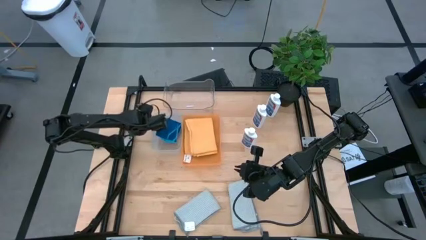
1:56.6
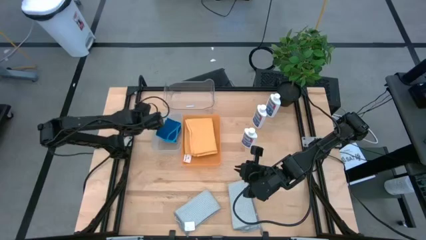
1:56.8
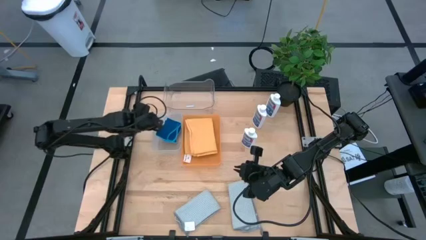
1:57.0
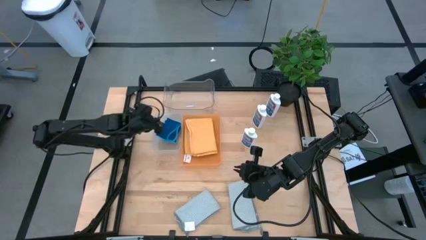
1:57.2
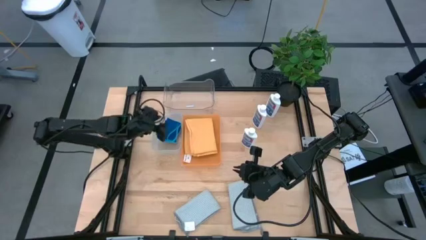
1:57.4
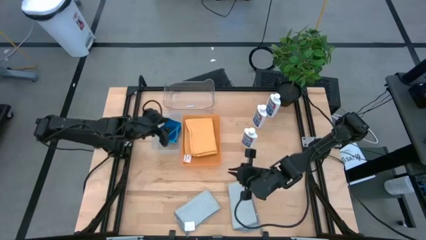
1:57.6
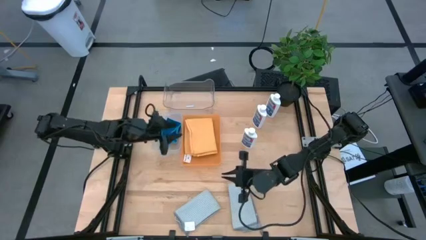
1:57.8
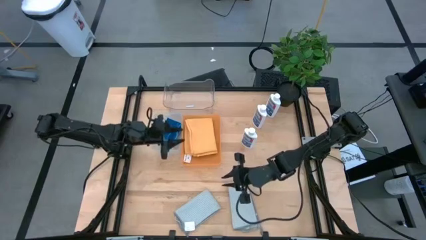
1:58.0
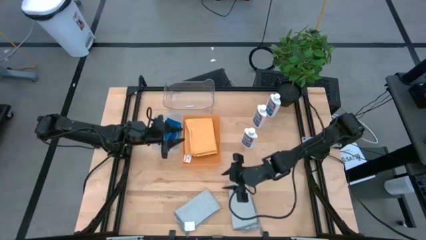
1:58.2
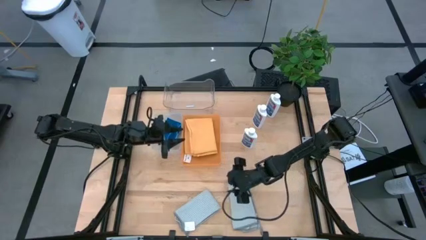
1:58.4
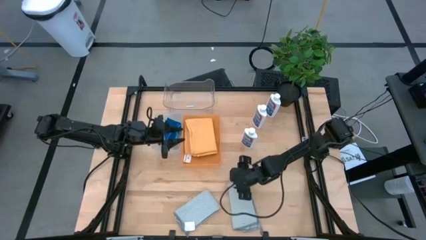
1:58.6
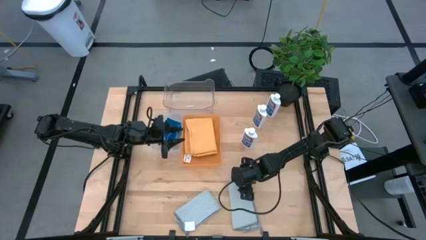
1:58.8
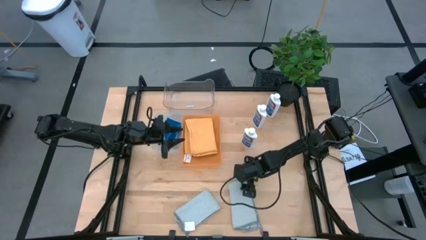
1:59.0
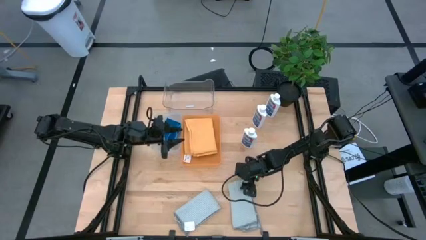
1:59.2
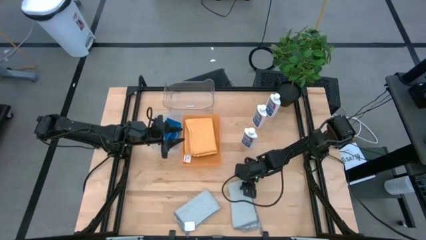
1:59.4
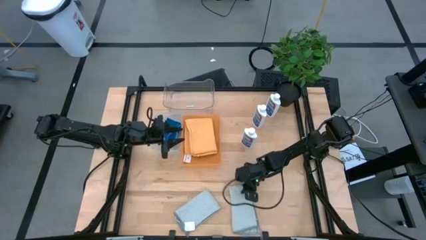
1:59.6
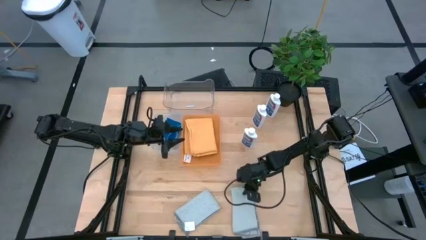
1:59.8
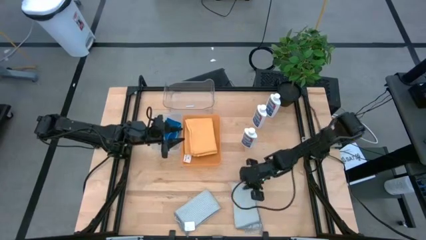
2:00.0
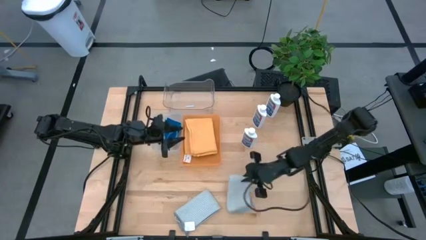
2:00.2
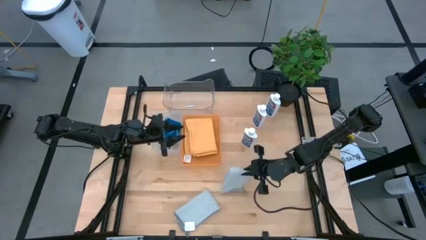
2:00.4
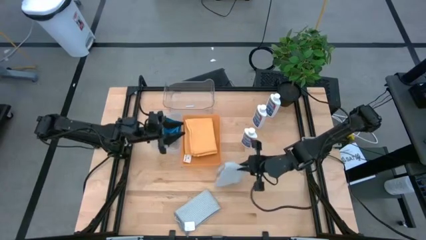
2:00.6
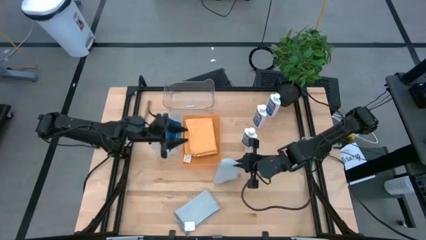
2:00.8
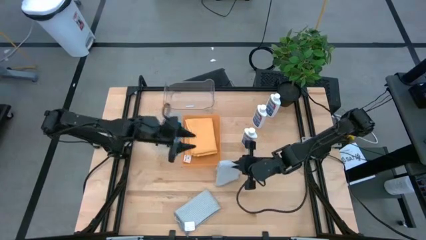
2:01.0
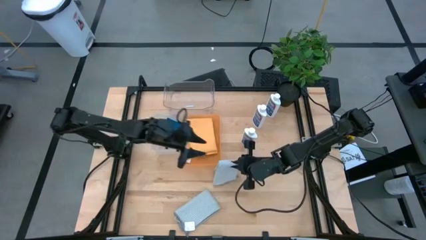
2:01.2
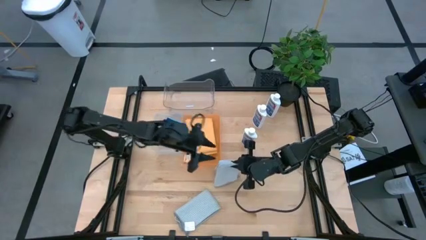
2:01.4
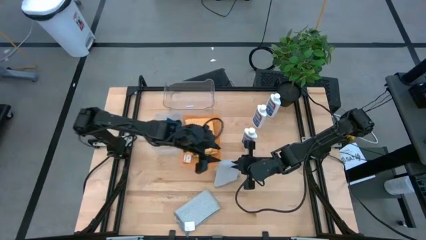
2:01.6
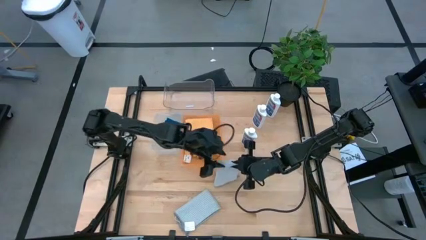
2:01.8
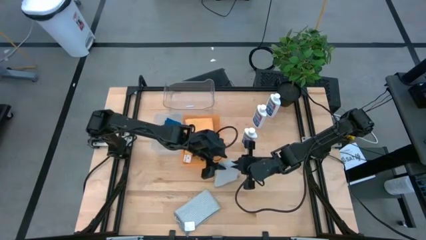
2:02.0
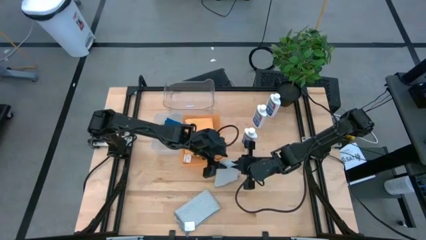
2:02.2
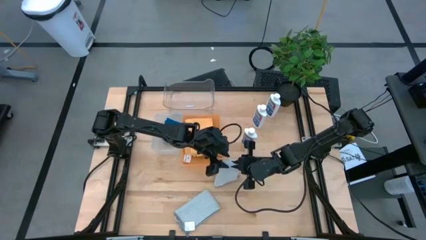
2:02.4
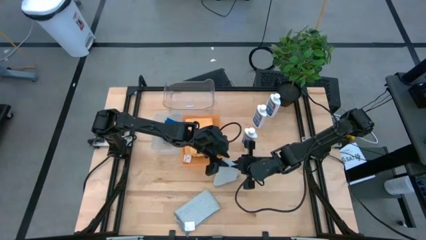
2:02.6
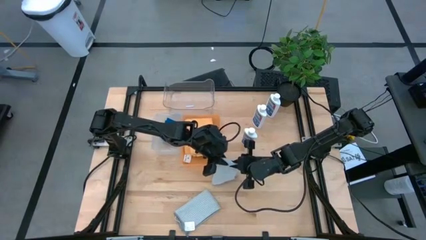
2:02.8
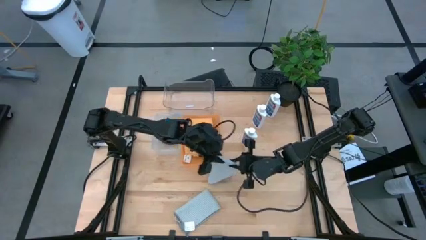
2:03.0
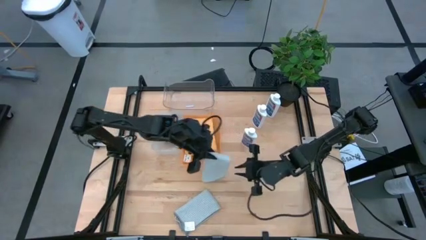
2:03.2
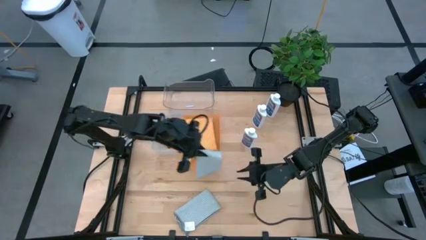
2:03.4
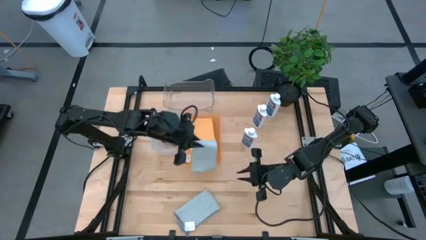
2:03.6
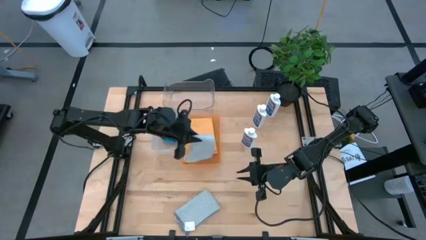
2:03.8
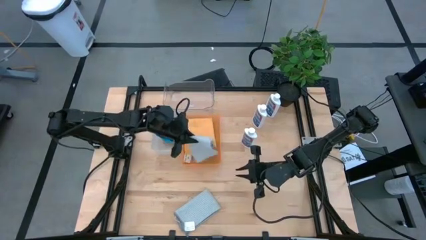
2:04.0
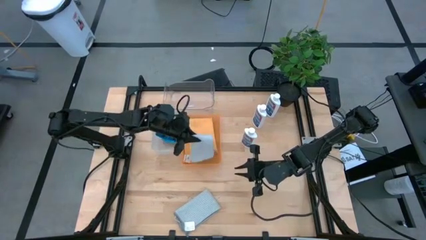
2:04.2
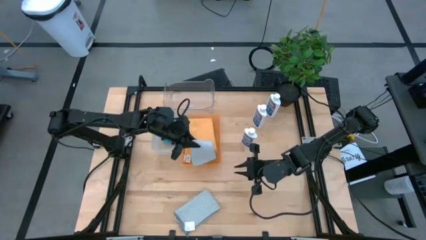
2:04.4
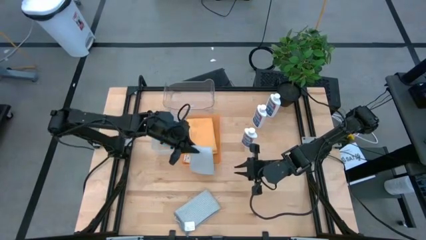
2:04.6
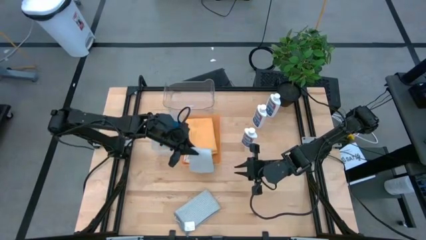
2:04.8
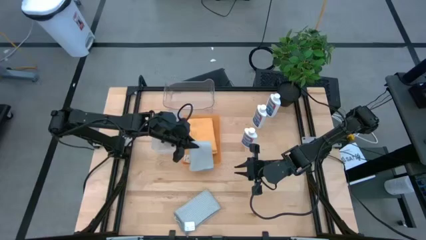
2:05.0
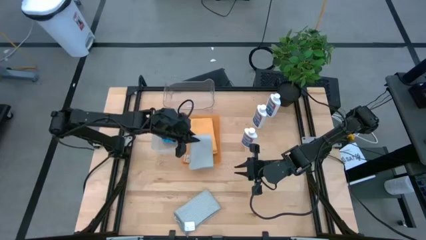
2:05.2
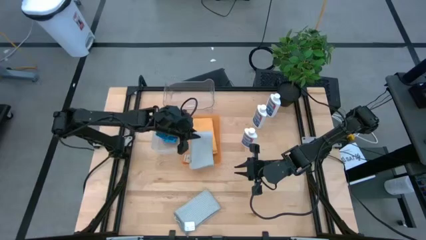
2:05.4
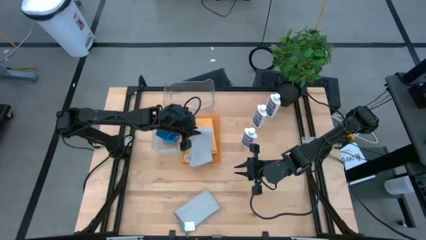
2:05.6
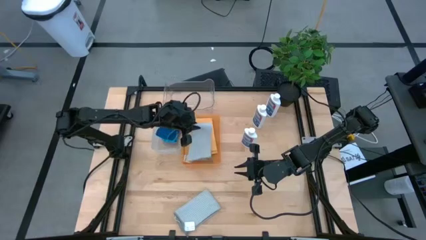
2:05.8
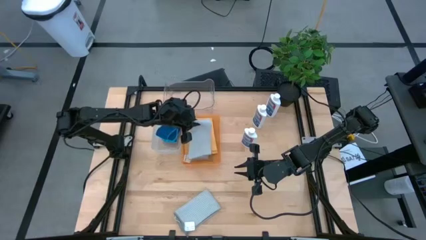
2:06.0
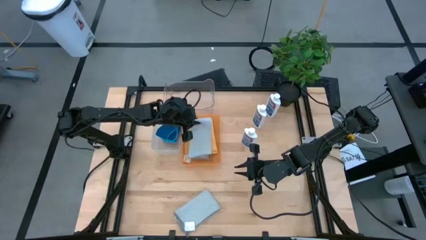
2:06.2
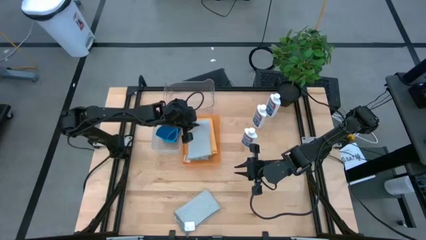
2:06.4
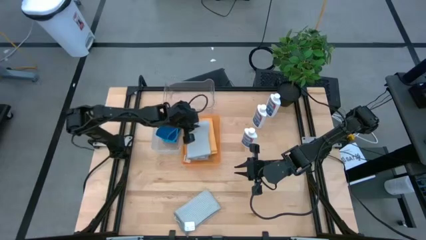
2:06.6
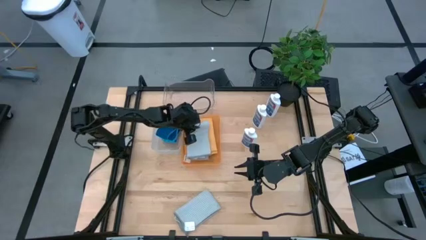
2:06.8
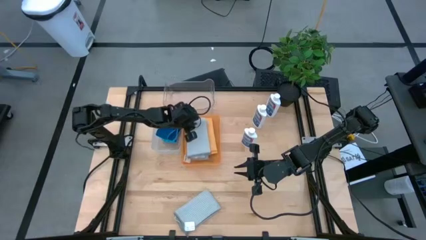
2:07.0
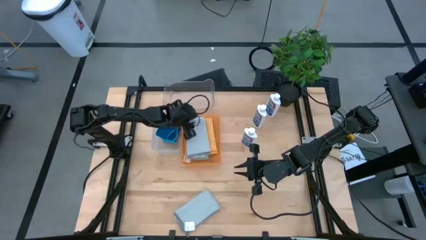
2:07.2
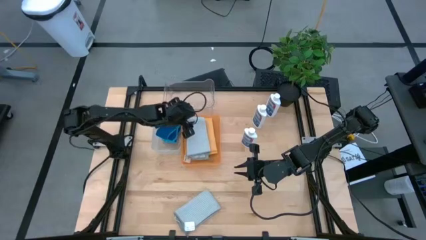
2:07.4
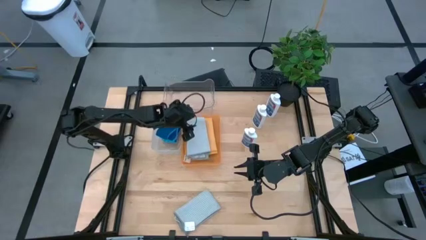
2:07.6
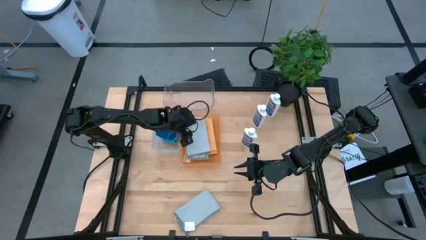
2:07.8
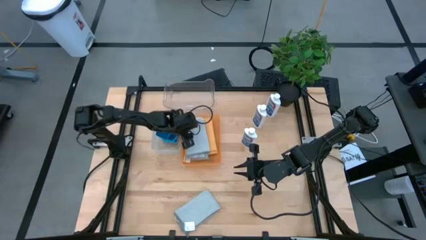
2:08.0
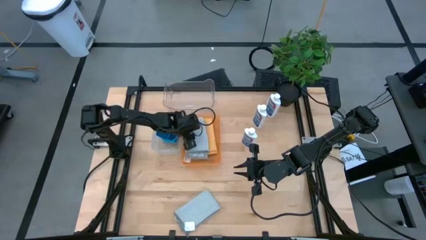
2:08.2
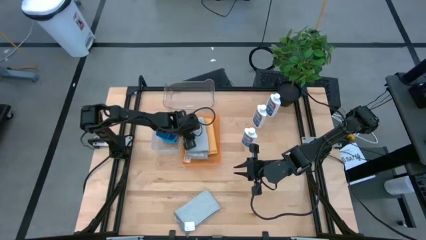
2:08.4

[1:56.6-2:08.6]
Task: Pick & Place Kitchen Items
Put the gray towel into the orange bin
